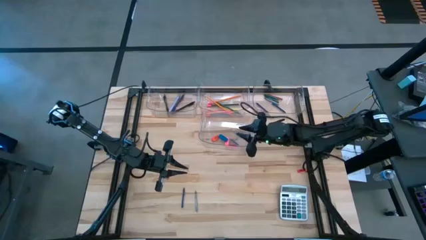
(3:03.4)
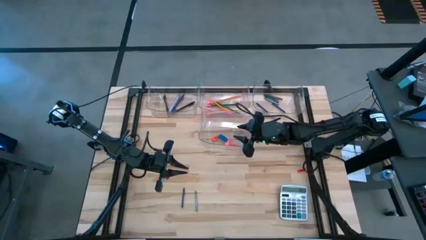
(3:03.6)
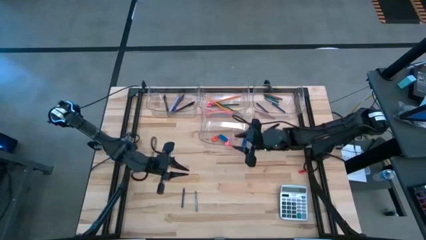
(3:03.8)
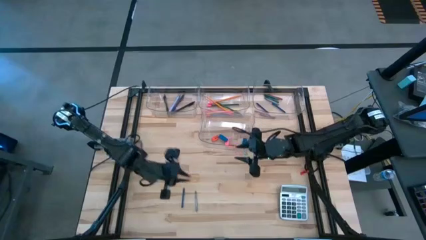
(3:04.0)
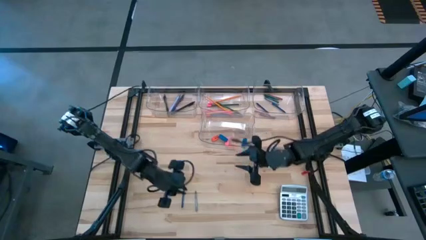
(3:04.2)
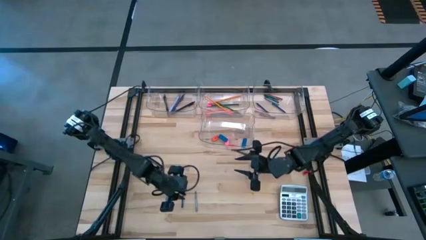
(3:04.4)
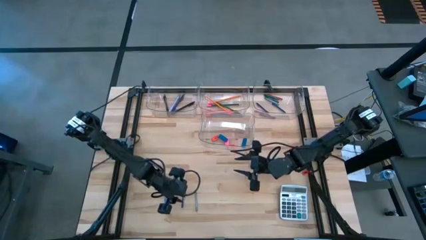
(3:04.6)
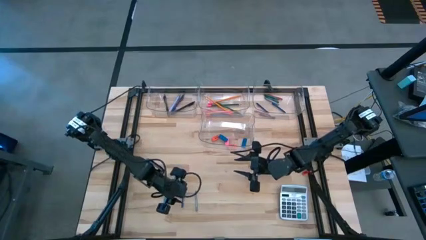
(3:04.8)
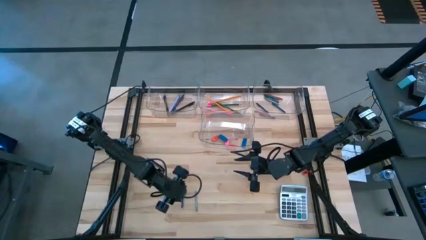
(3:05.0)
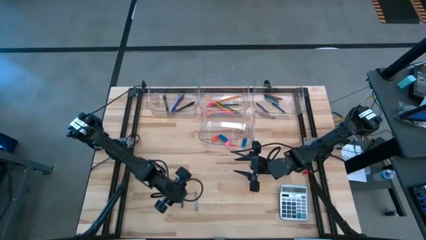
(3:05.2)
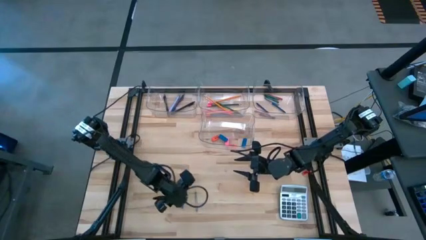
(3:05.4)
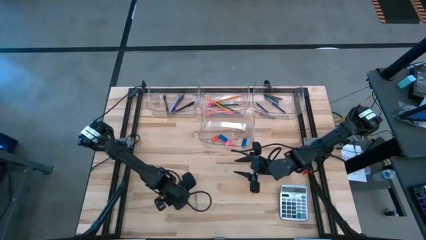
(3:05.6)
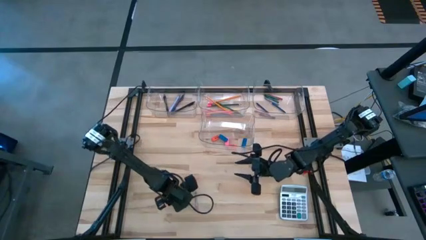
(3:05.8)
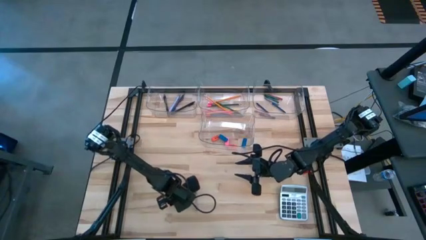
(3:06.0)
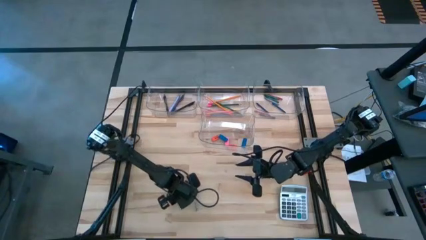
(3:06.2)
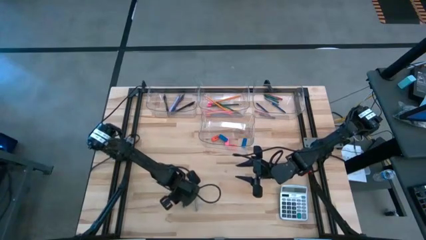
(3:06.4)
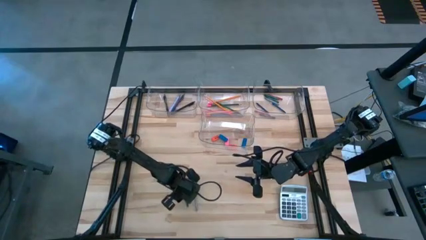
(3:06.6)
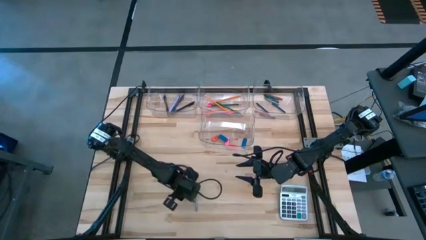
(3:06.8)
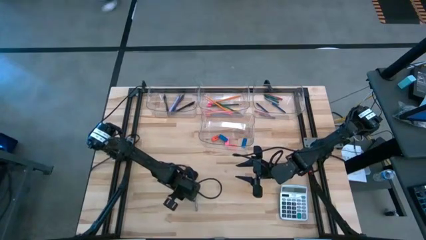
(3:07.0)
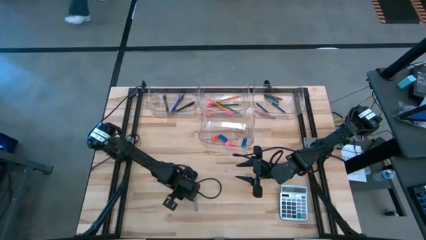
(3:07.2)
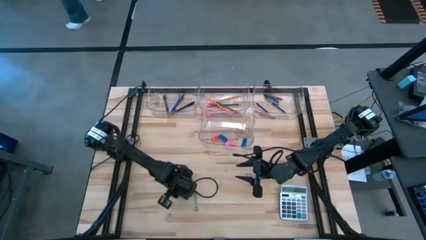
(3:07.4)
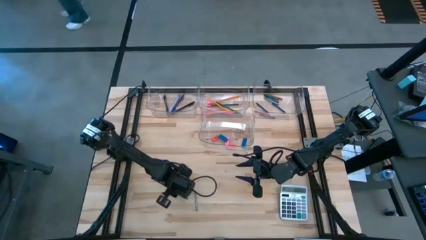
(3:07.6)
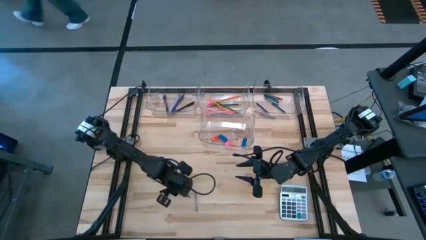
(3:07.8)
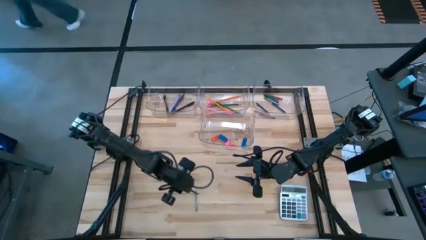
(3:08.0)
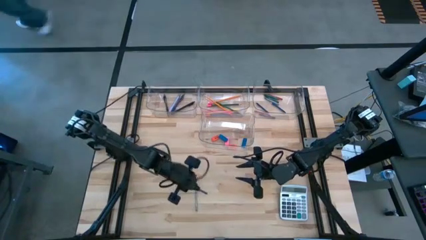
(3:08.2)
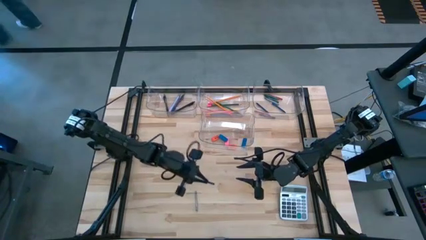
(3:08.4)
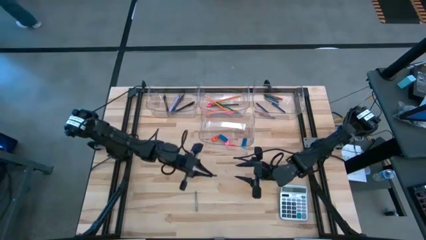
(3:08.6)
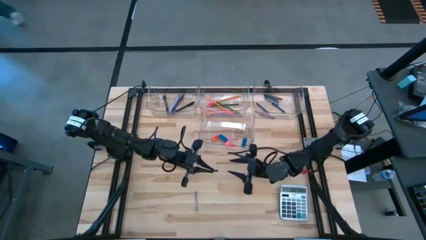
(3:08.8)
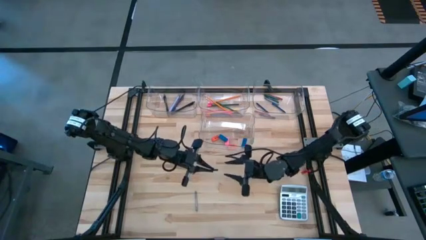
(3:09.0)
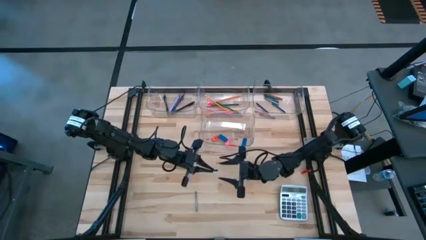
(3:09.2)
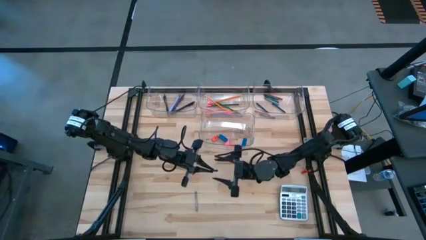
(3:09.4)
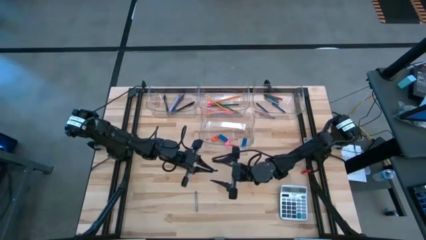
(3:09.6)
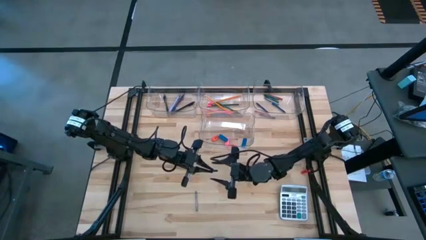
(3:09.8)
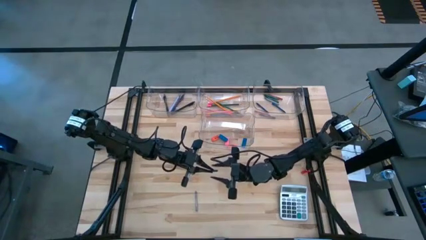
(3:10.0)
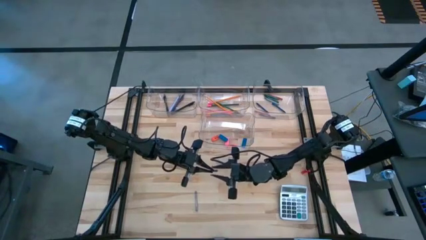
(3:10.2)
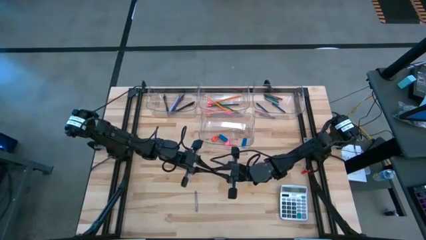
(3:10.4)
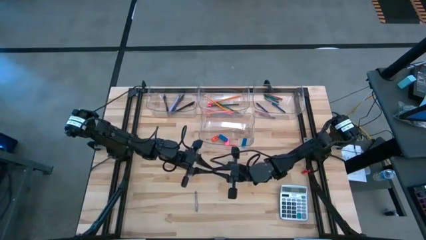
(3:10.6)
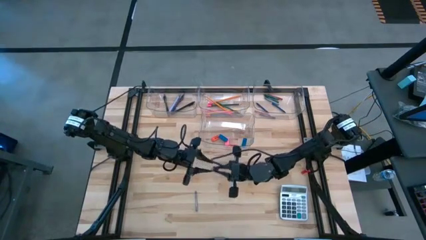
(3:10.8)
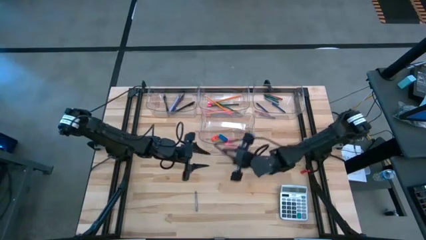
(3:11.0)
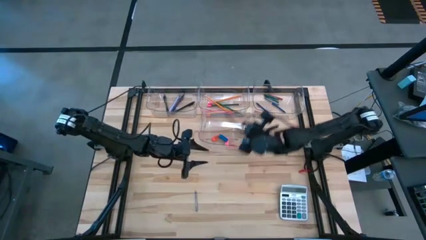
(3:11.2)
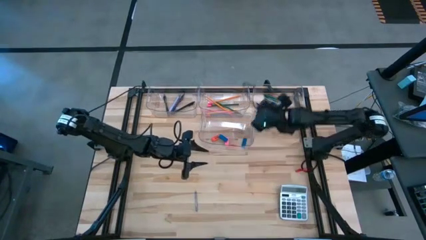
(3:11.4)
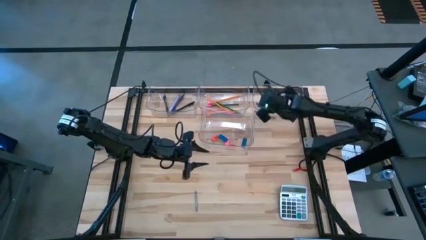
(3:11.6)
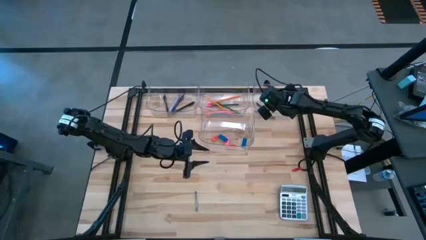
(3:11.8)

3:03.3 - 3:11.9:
Task: Sort crayons/erasers/pens/pencils in bins
Put the blue crayon into the top right transparent bin

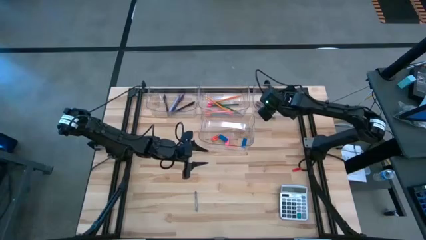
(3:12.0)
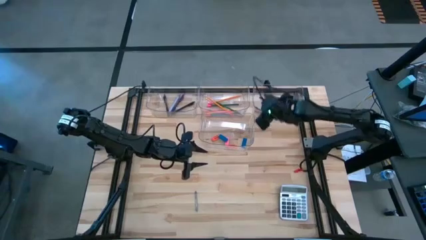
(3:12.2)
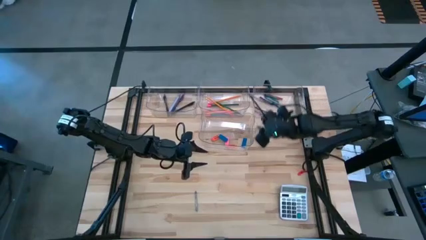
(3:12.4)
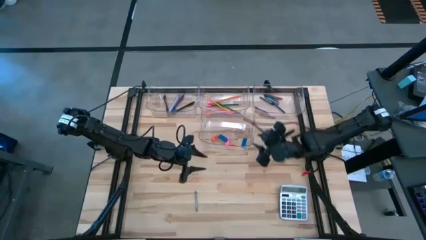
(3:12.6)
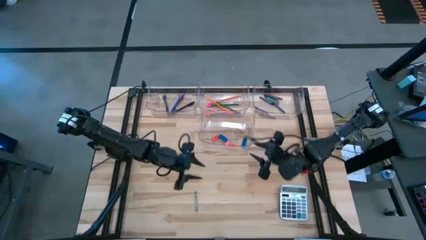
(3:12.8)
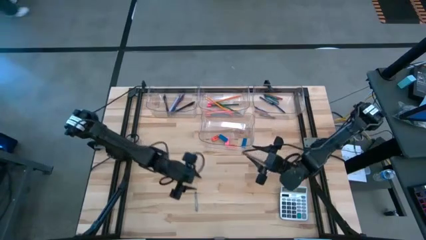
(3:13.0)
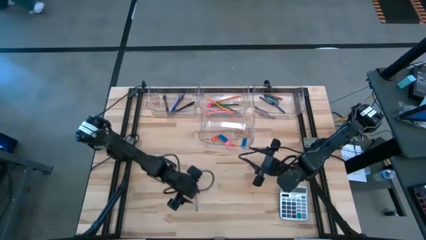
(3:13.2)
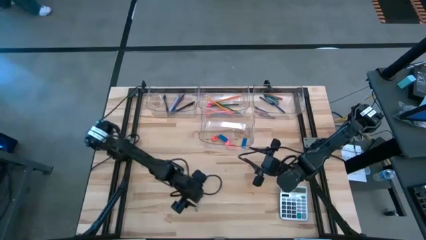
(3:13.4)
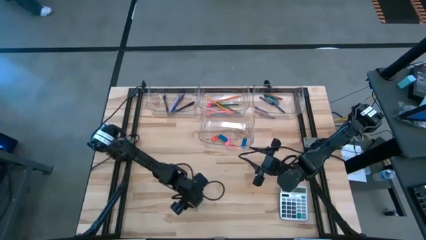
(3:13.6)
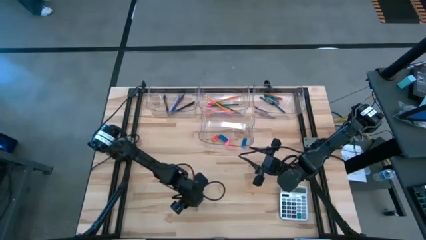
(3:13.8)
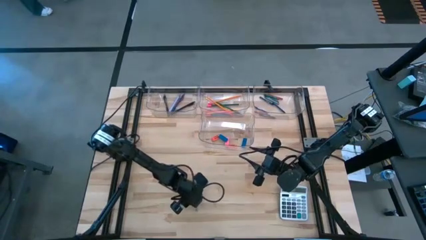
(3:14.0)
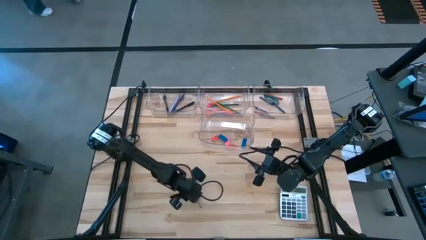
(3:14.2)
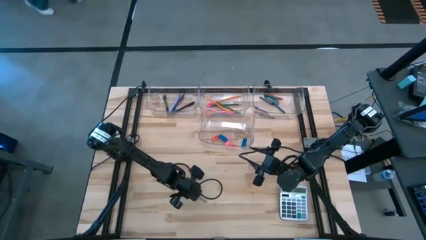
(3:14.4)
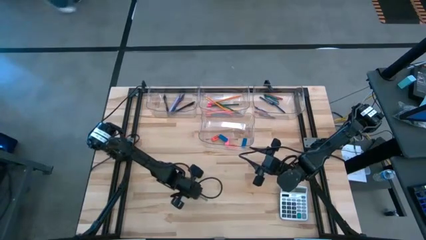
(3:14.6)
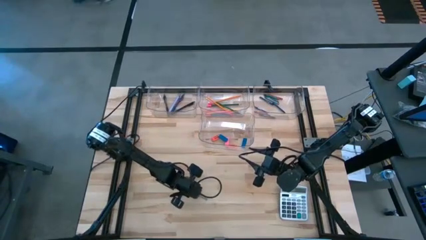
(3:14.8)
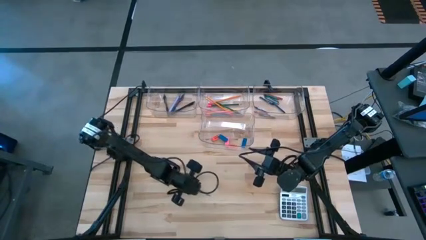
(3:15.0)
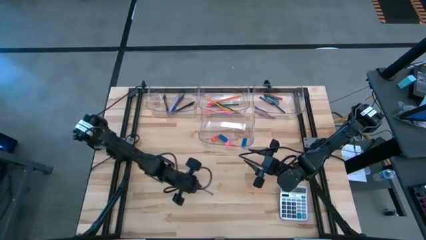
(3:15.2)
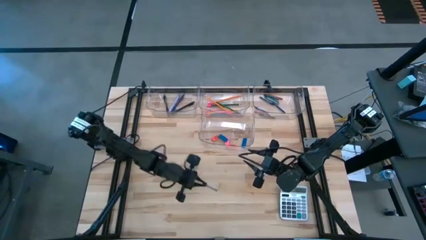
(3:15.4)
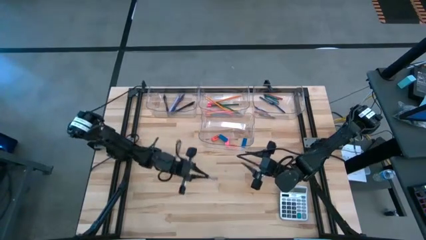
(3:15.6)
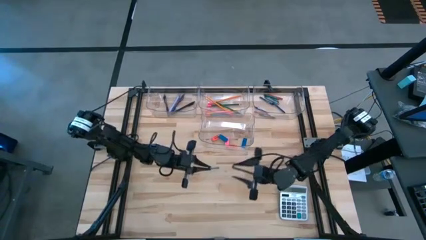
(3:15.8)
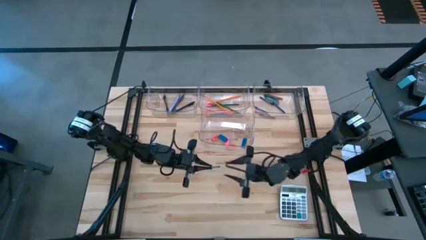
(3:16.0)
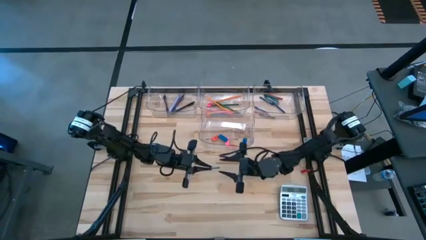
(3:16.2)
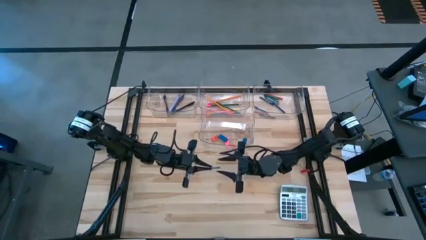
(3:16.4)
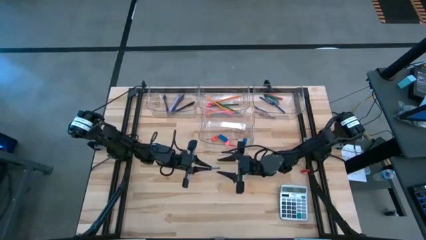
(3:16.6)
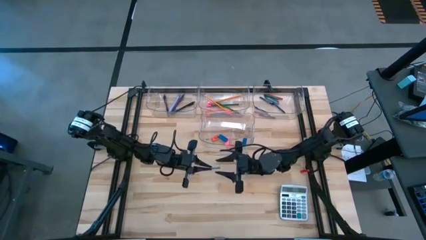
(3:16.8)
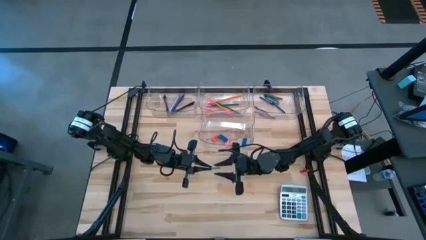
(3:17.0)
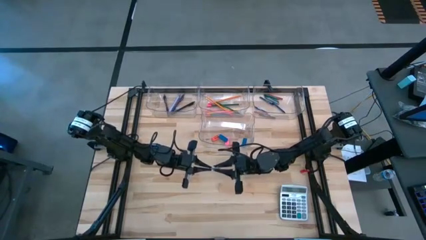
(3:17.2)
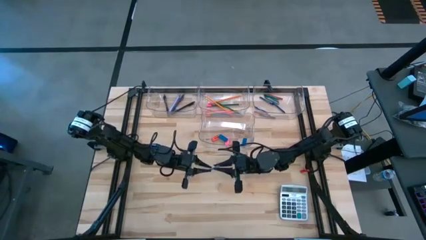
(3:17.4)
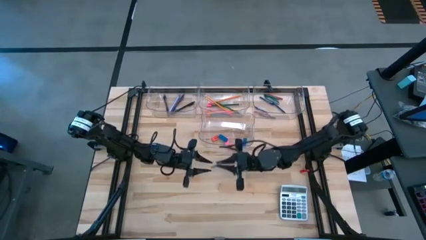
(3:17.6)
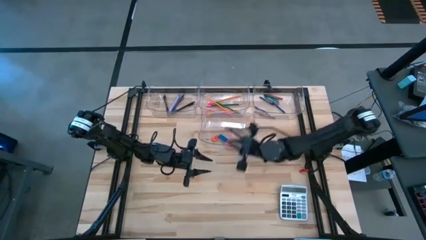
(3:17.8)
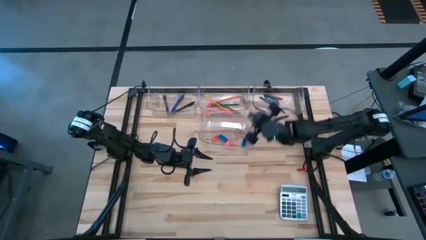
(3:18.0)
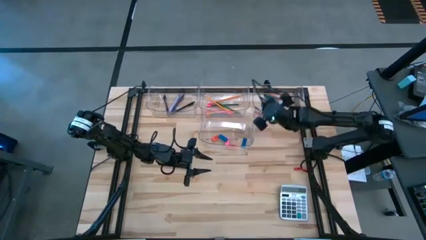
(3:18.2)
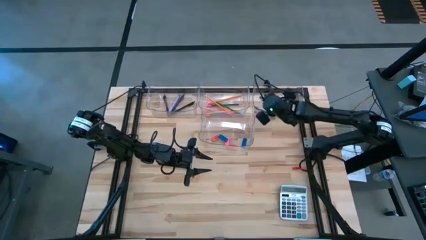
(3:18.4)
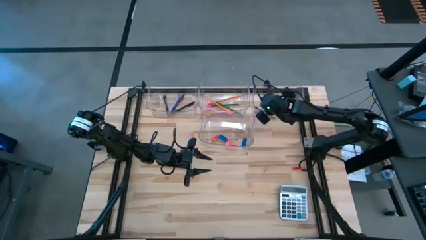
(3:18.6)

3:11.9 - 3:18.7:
Put the gray crayon into the top right transparent bin

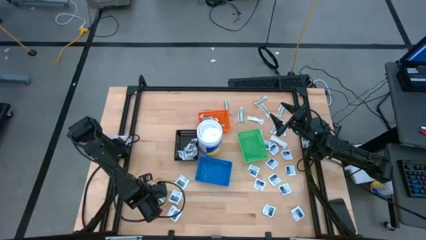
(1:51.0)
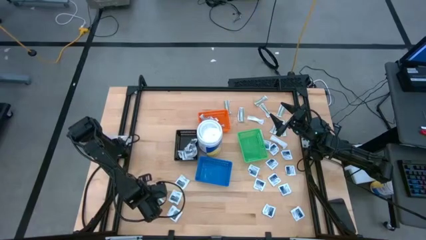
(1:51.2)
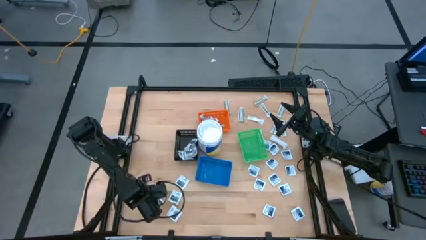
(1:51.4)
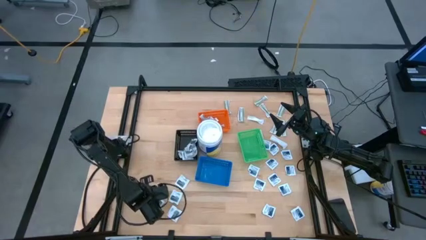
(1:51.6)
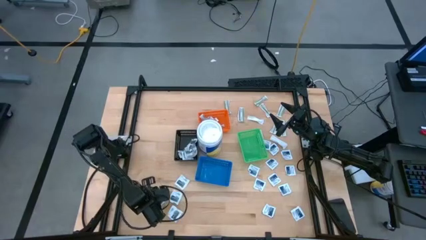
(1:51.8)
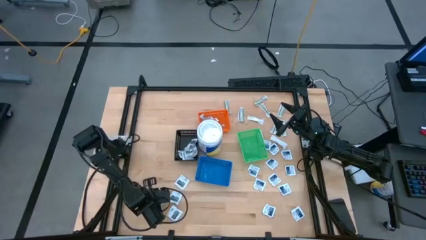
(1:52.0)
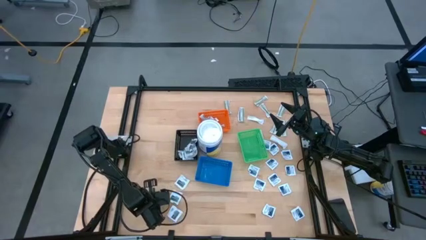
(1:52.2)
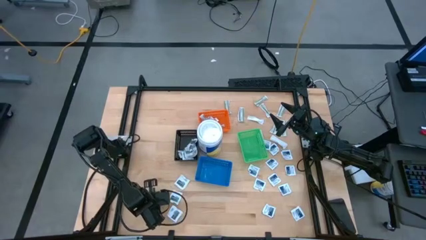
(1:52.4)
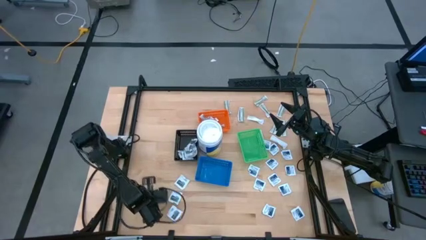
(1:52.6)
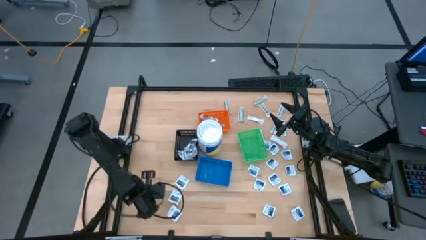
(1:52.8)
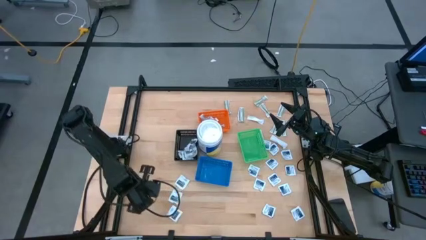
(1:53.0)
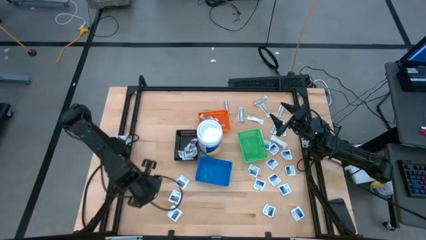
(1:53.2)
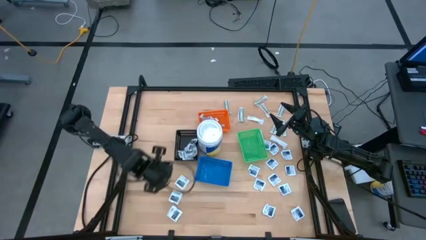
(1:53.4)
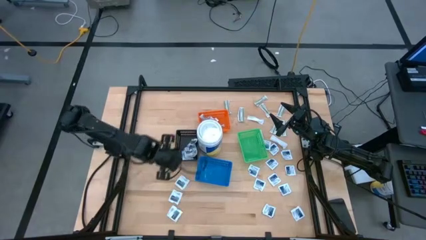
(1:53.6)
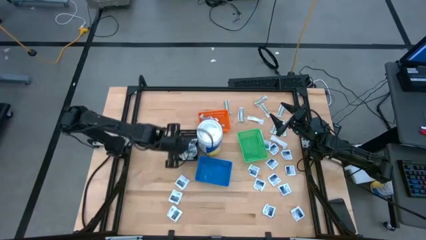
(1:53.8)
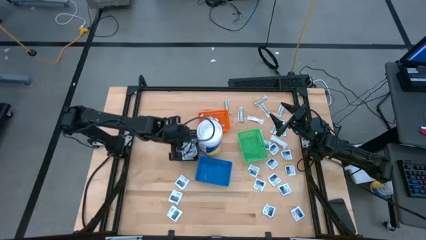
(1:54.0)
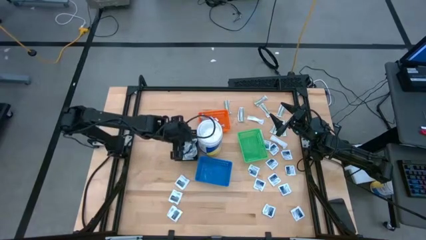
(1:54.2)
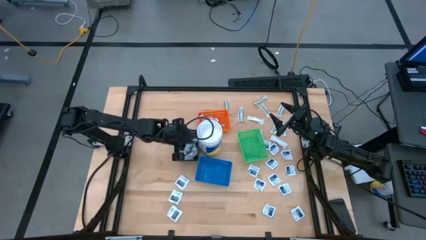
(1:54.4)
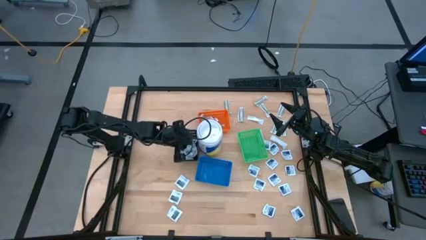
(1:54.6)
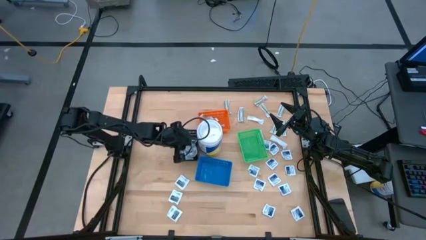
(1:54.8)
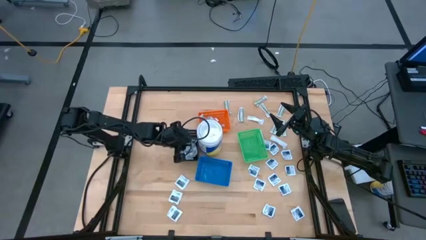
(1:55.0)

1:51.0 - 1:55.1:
Task: Pick & Place First Aid Supplies
Put the gray towelette pack into the black bin
